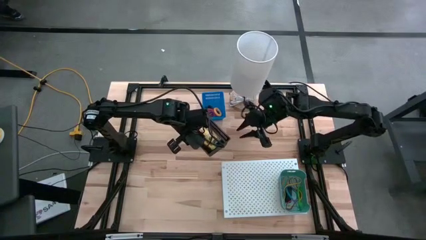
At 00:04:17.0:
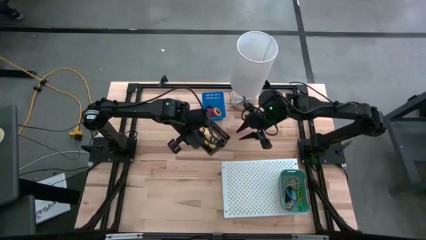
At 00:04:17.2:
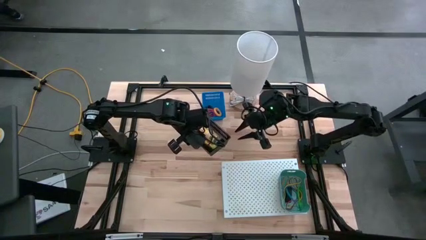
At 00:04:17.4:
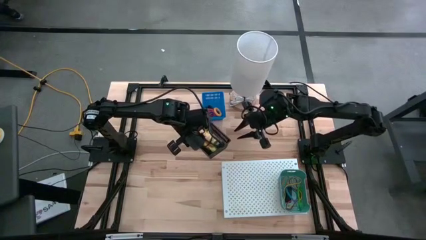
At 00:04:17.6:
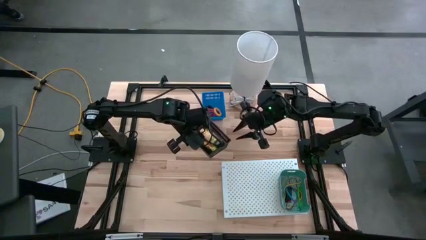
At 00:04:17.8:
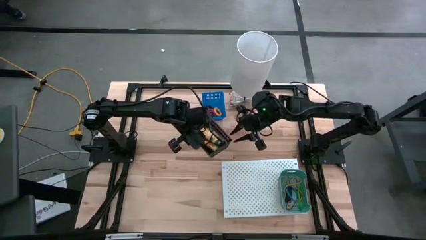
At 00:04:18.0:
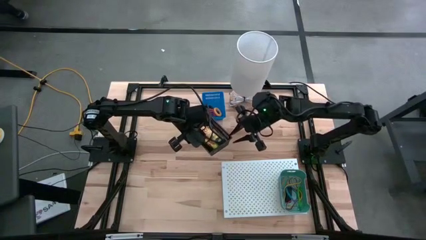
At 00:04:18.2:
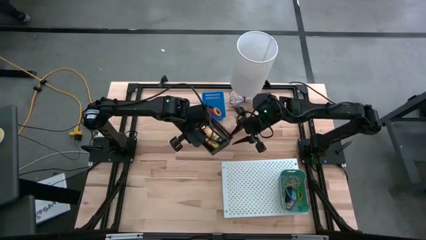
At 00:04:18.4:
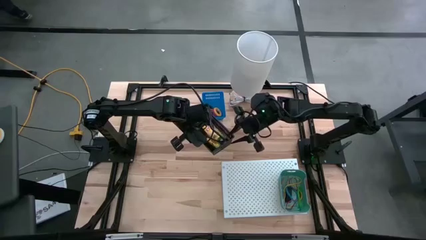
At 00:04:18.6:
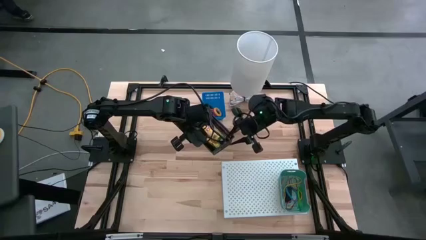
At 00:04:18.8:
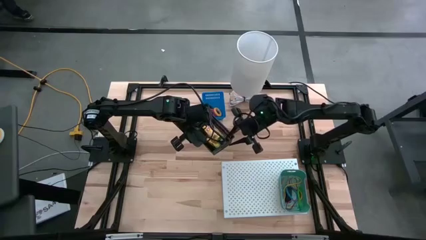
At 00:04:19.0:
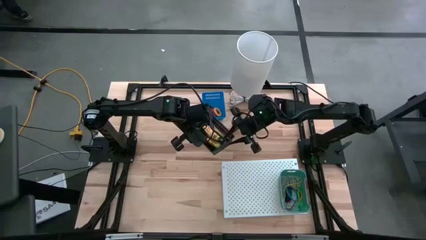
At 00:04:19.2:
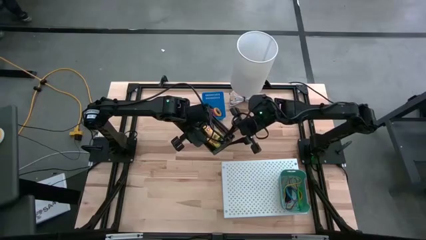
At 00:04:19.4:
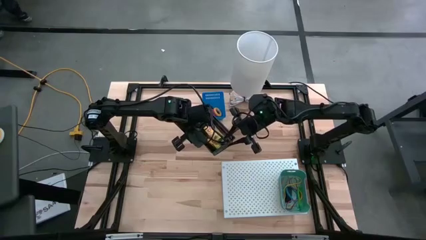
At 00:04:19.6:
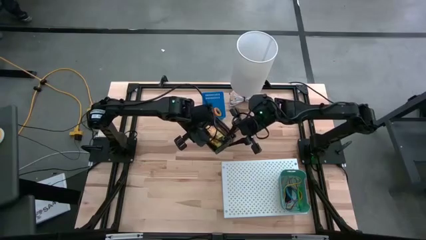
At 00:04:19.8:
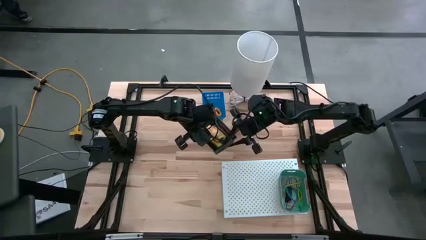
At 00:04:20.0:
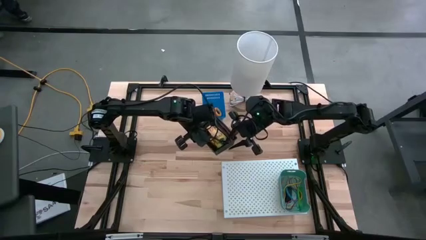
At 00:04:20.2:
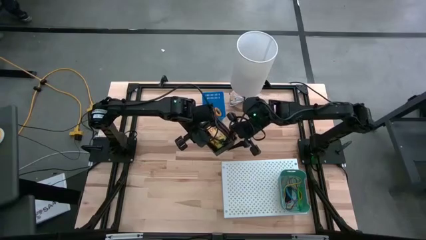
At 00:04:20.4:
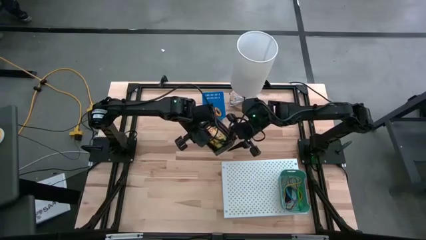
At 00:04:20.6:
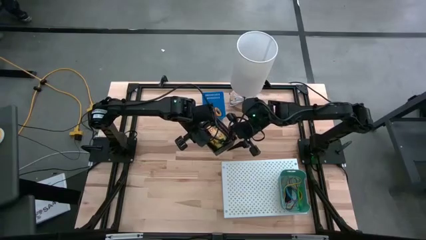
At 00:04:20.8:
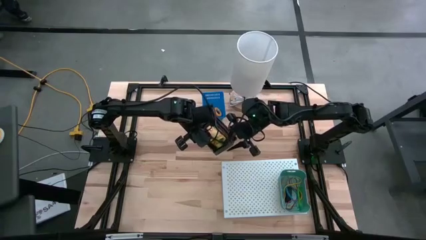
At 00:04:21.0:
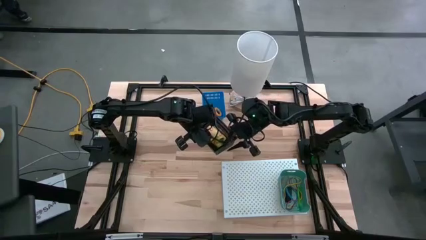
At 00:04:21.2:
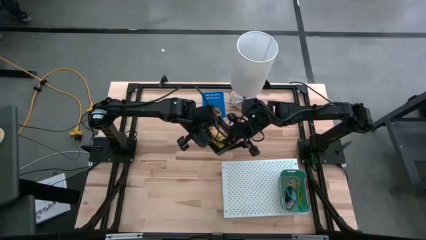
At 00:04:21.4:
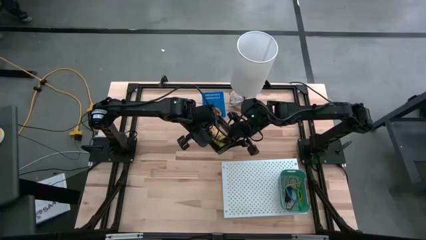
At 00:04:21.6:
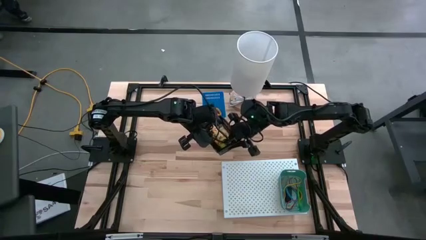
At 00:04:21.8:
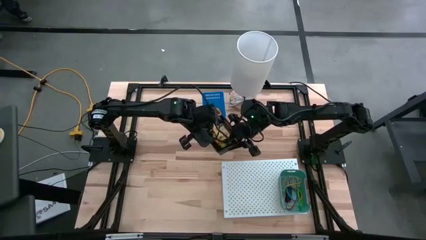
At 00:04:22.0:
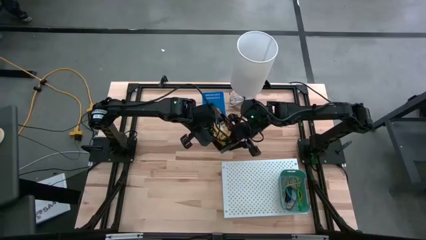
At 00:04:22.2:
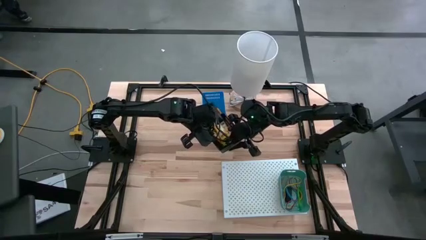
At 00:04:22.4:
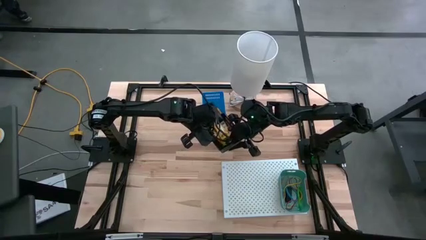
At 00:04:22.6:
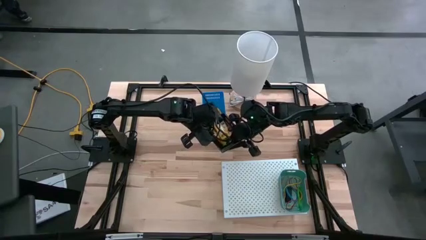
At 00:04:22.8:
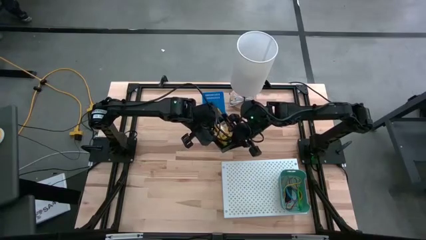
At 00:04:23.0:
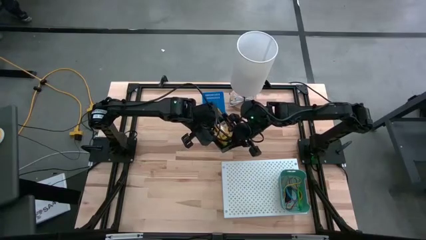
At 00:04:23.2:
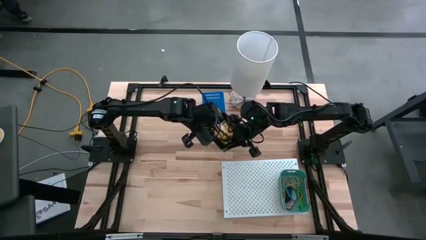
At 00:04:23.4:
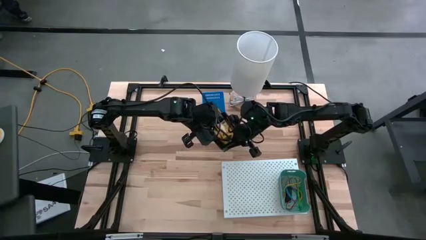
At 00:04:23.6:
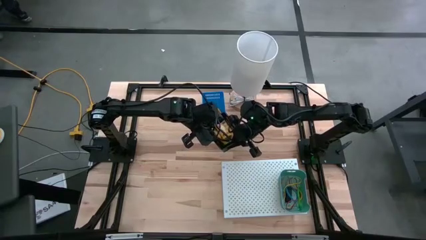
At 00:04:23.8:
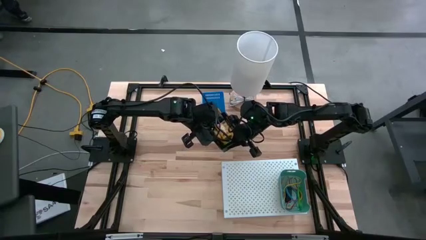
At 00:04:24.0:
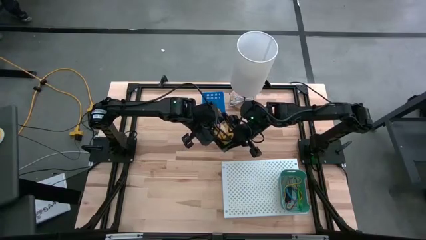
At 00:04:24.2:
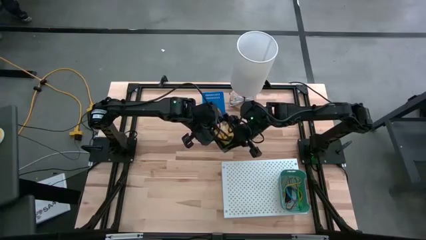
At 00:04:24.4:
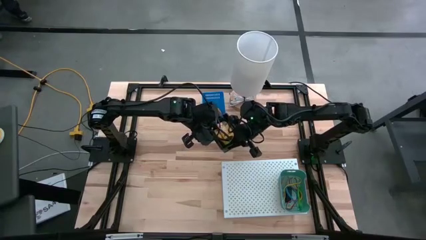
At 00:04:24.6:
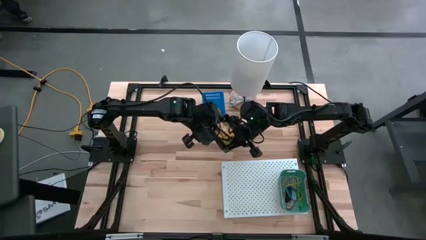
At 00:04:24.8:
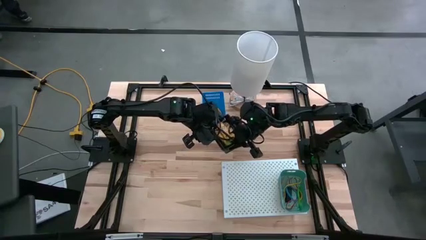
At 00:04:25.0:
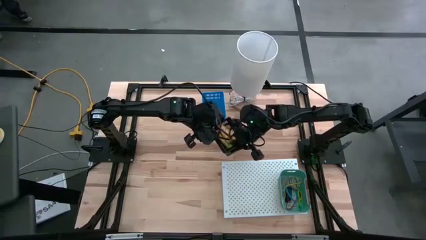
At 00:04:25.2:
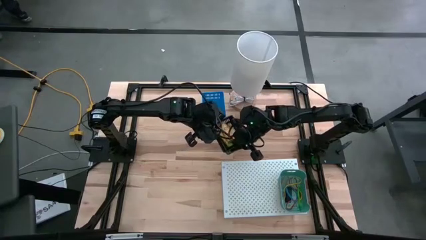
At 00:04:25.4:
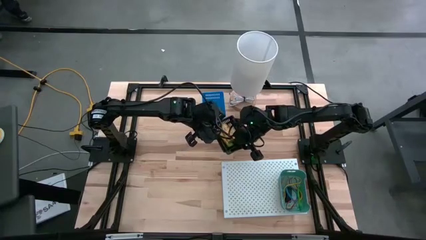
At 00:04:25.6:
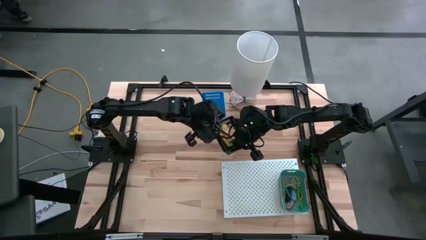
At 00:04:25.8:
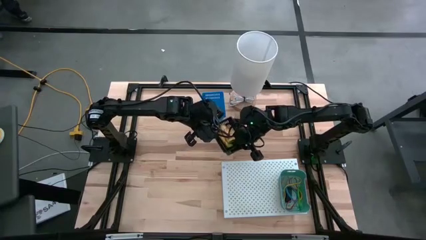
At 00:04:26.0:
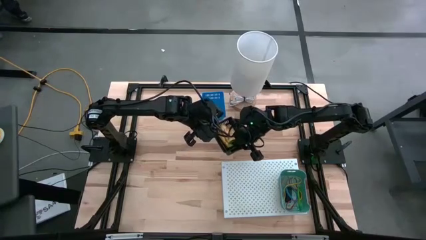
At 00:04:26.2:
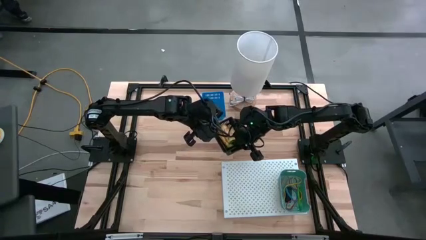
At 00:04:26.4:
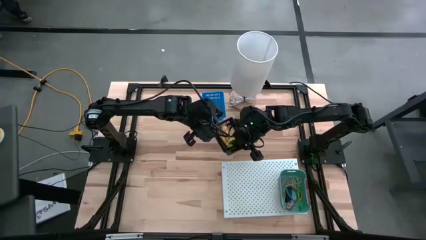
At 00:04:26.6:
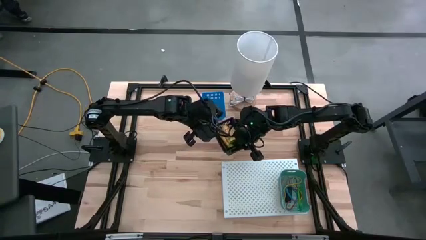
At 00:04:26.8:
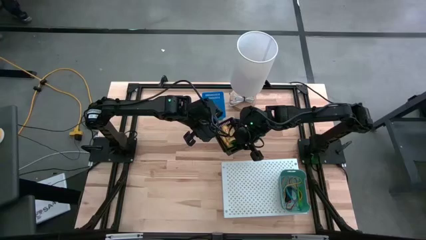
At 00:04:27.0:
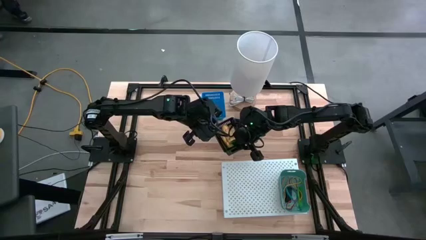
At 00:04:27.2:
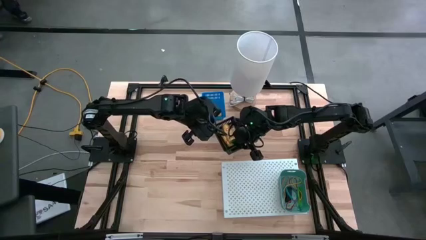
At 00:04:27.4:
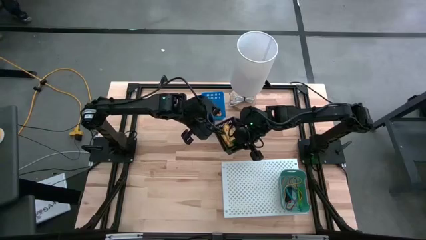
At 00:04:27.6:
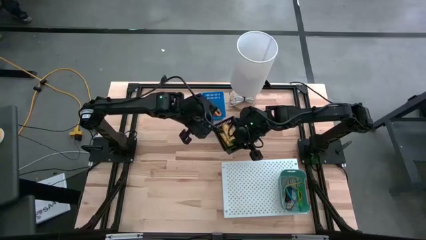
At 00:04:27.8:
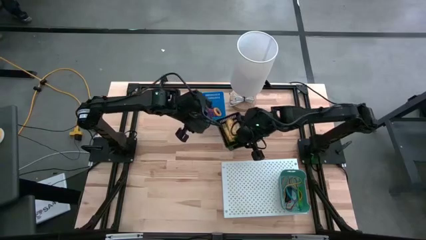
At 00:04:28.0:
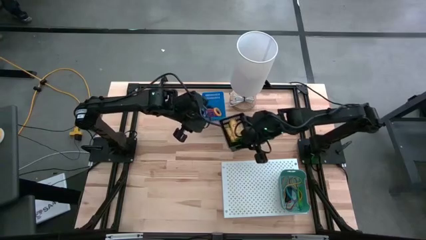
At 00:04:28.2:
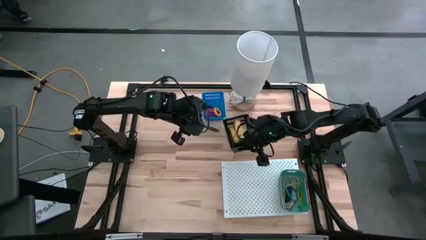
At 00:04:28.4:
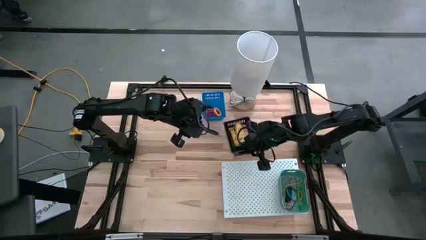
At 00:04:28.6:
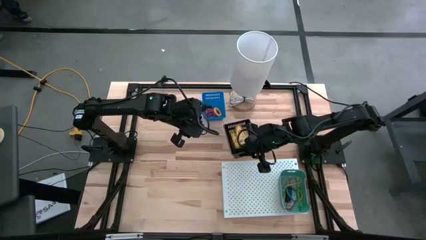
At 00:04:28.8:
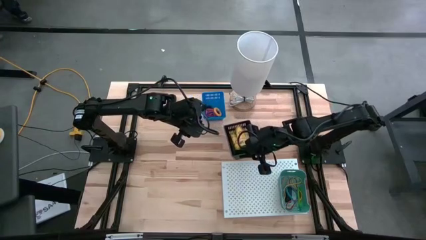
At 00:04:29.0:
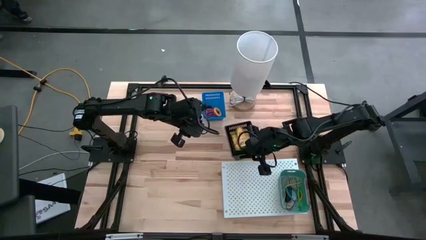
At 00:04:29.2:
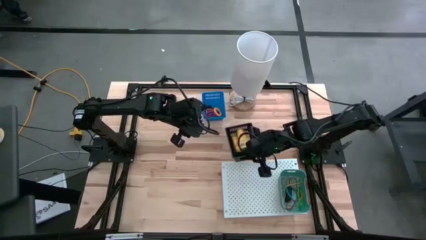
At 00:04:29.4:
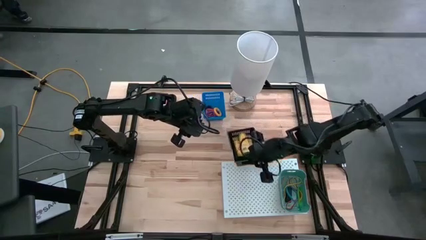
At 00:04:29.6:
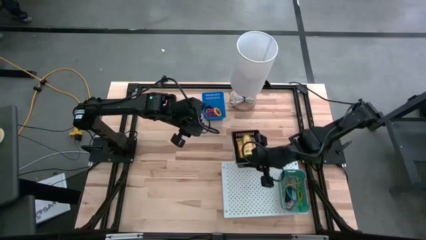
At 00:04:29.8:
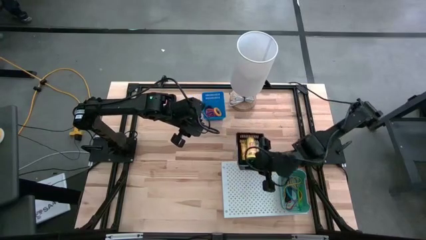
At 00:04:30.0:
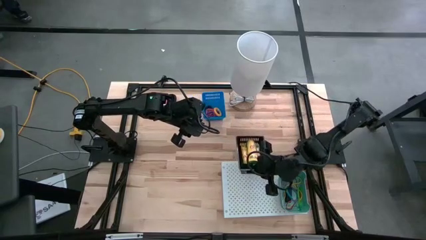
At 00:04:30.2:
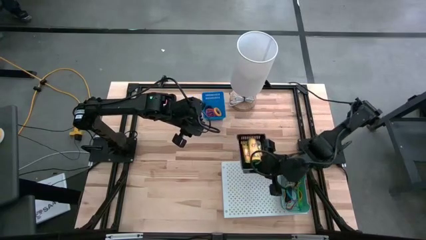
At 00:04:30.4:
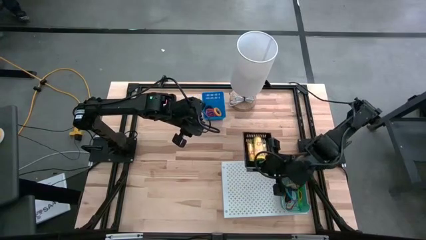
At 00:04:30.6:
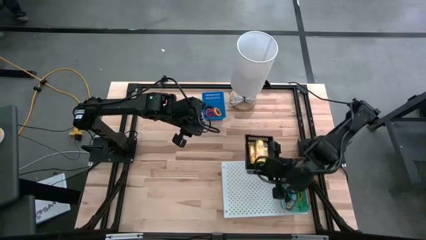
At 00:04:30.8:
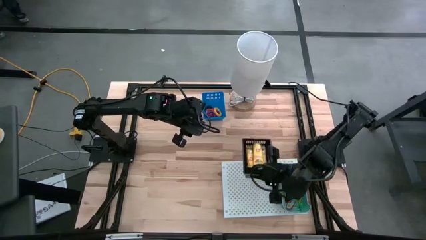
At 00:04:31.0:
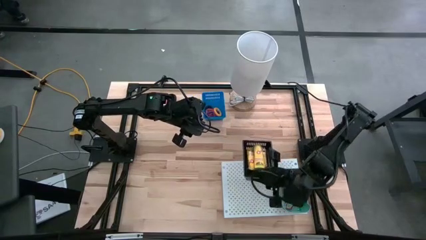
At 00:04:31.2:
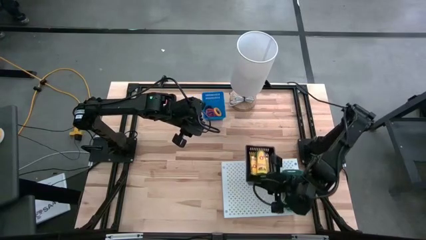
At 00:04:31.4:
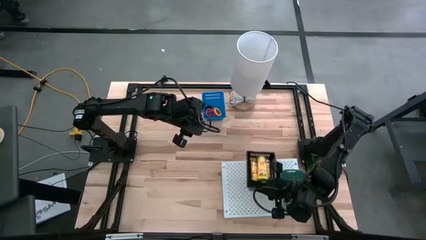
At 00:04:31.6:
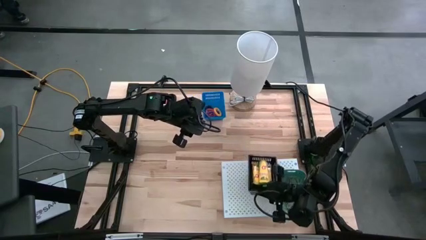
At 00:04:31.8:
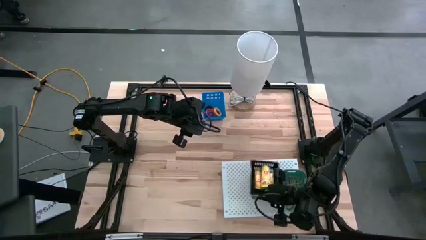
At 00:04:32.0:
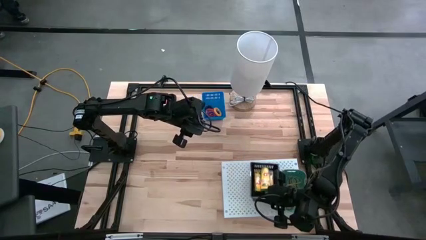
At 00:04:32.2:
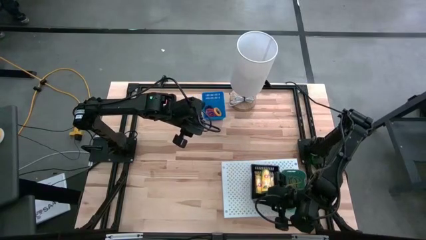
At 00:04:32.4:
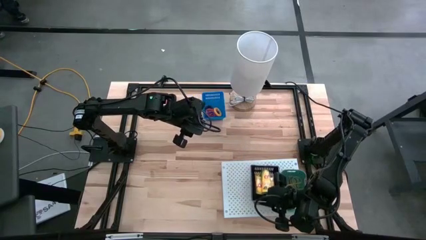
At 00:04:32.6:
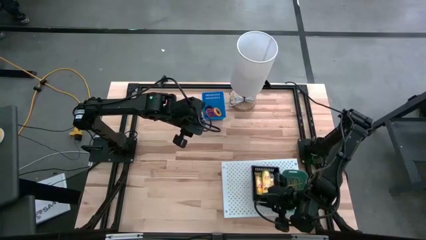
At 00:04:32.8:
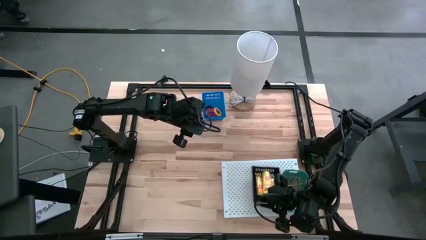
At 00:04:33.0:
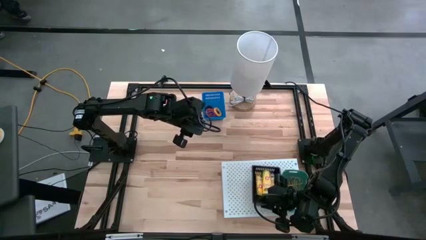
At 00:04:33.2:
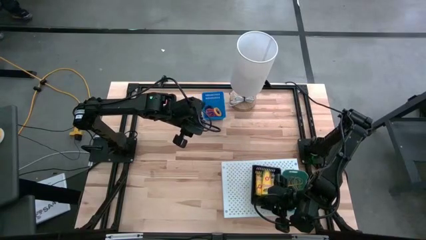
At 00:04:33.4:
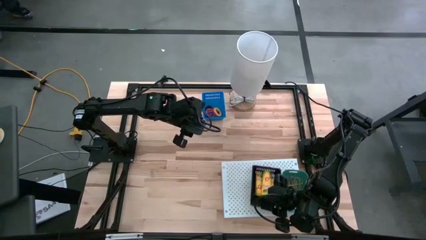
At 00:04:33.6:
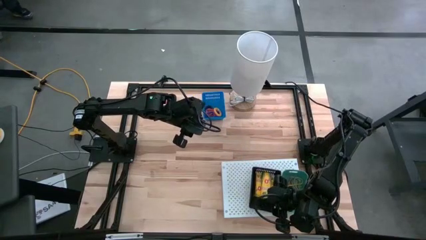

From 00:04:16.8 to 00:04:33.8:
Task: Pick & Place Office Desk Supplies
Put the black bin with the crayon boxes on the shelf
